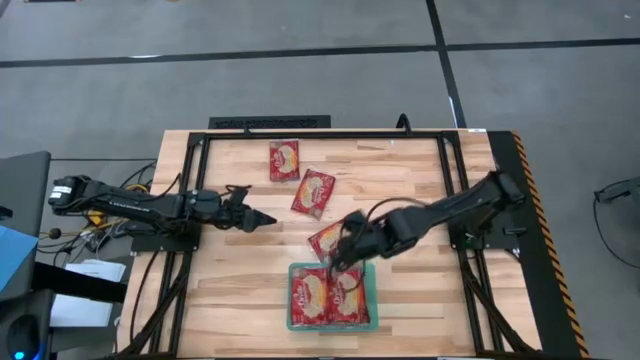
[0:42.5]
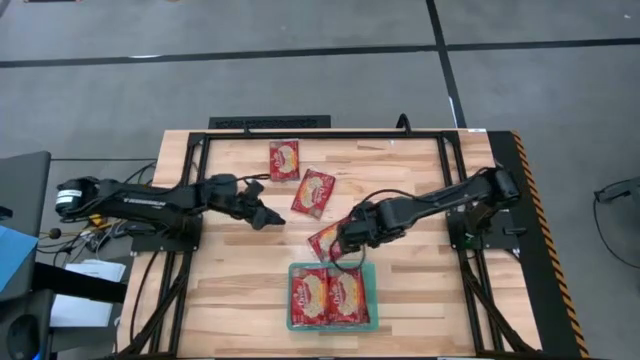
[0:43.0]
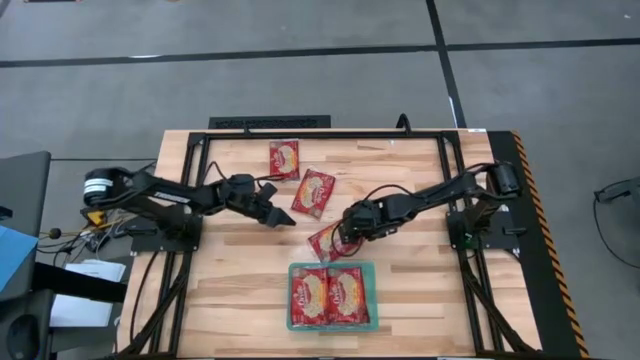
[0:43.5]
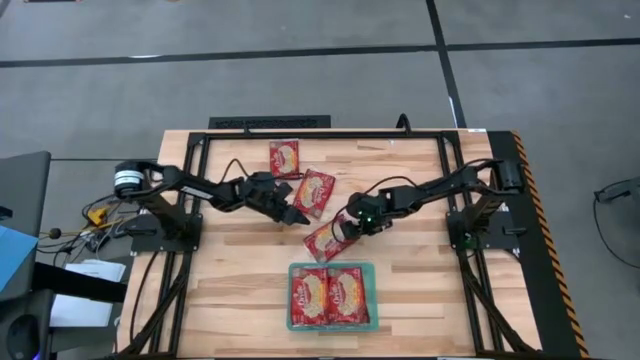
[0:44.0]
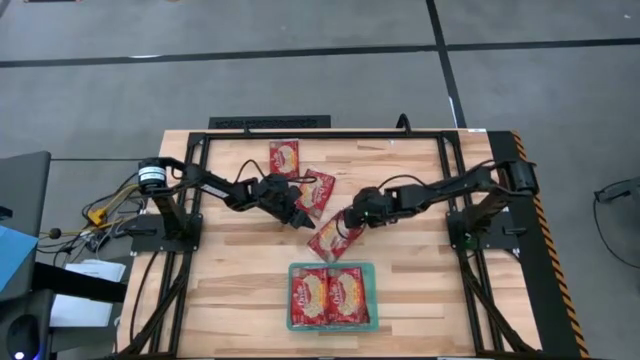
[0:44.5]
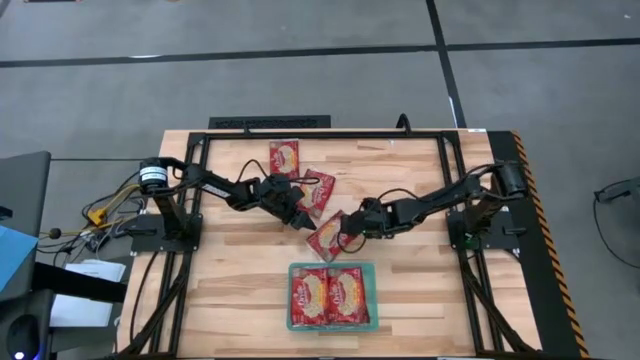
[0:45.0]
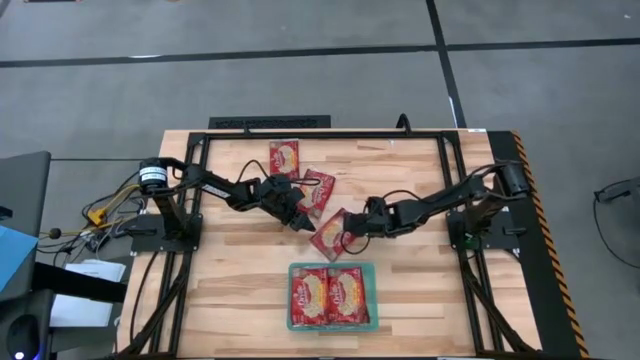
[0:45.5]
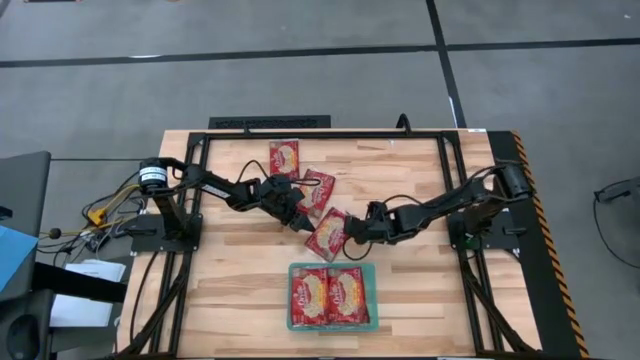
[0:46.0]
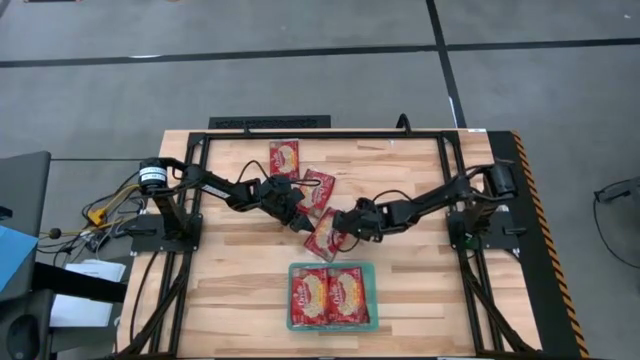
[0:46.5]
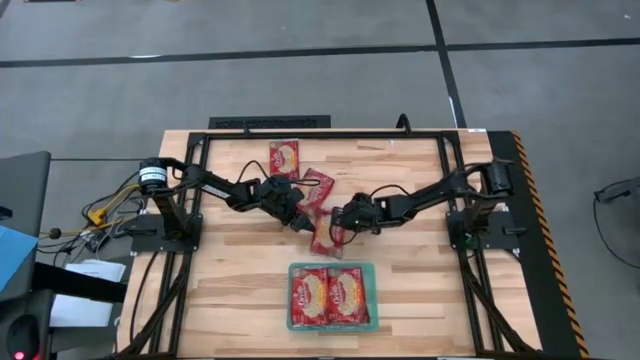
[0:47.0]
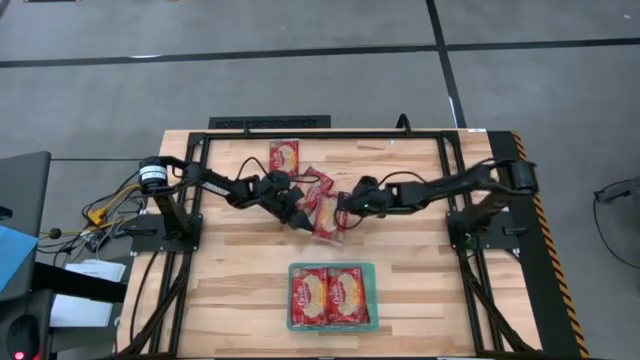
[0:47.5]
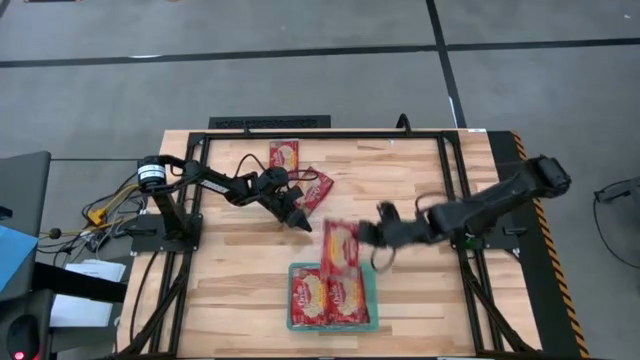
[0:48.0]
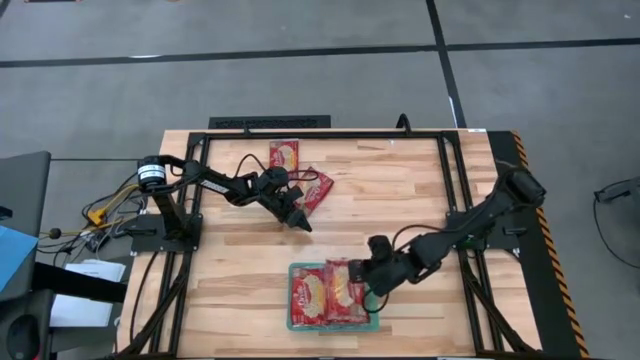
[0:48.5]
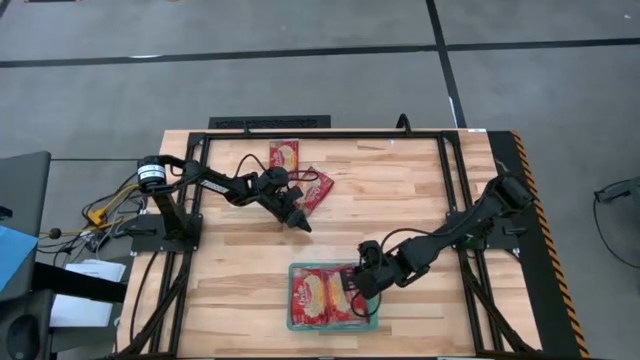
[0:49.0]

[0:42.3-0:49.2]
Task: Sort popcorn bags into baskets
Put the red popcorn bag into the green bin

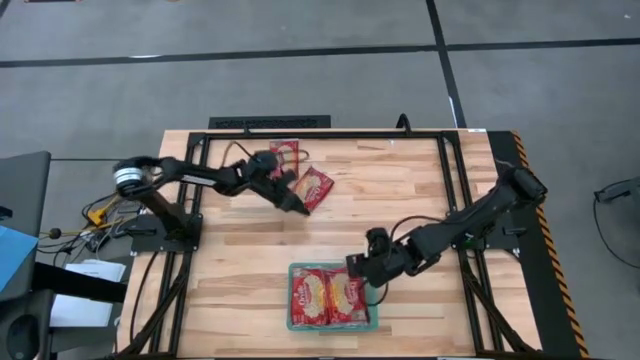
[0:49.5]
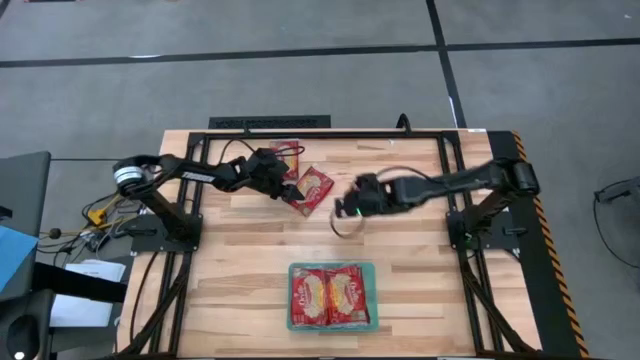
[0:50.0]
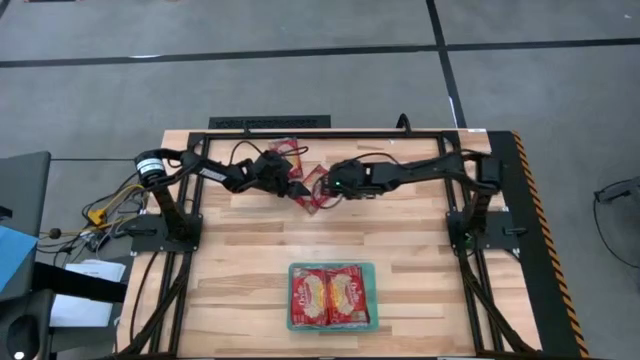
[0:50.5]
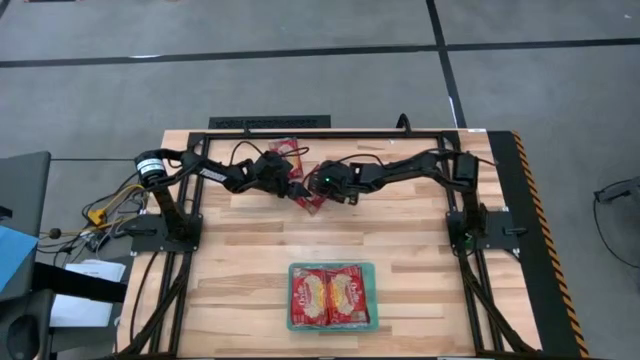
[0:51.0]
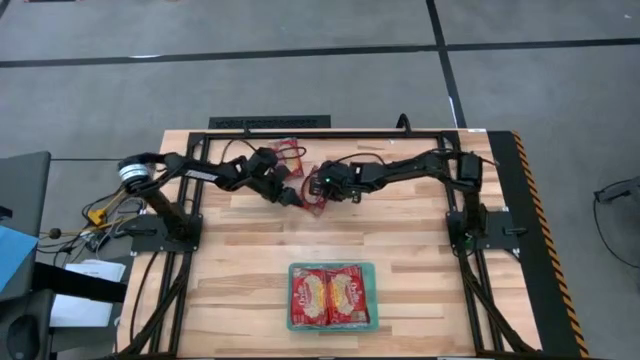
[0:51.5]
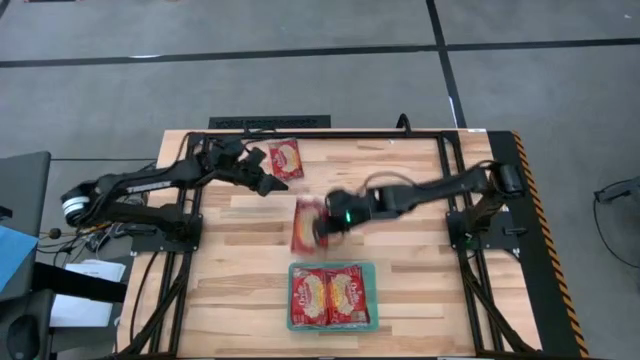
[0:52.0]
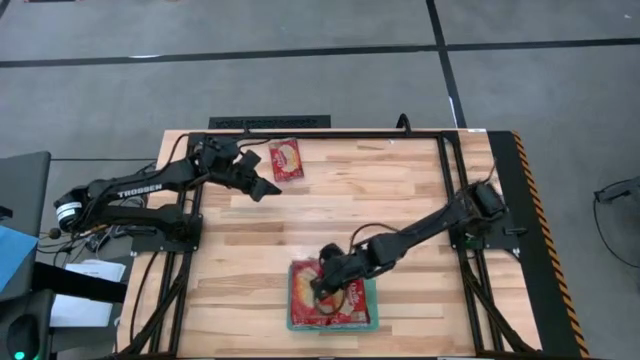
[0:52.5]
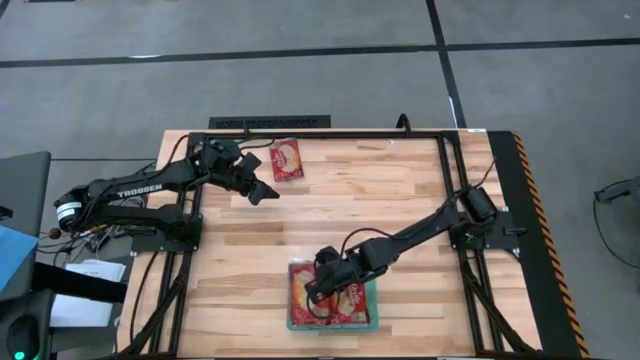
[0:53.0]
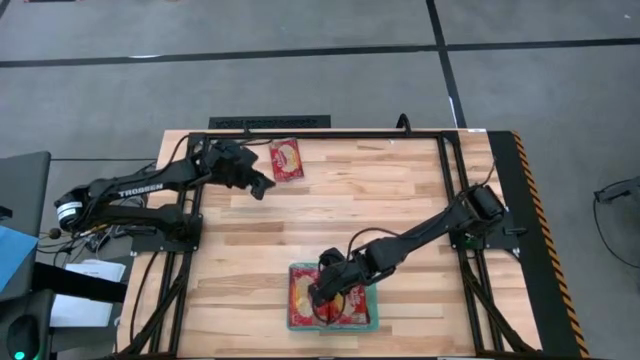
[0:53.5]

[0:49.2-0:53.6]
Put the red popcorn bag into the green bin

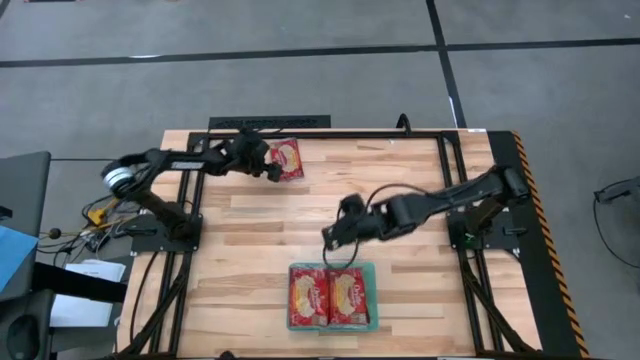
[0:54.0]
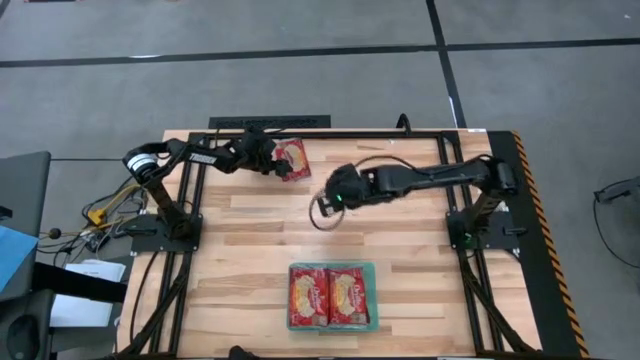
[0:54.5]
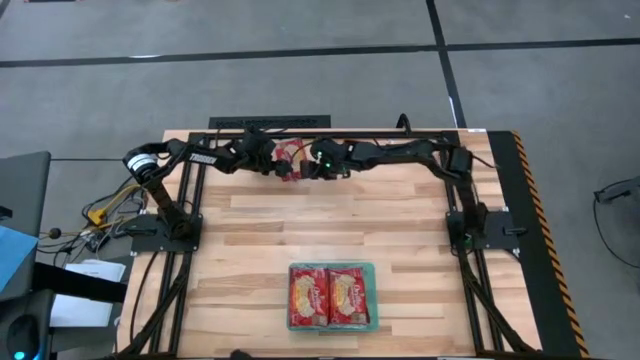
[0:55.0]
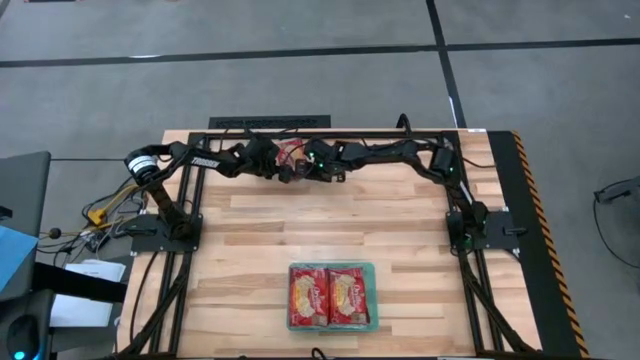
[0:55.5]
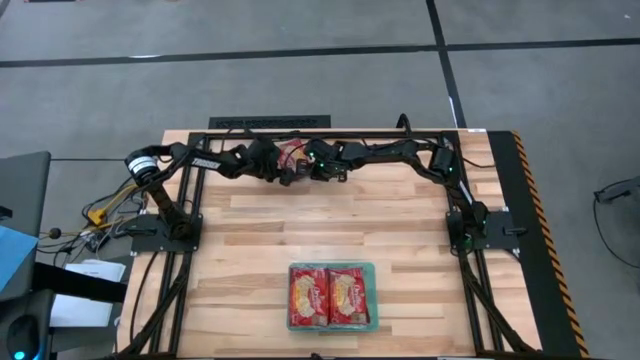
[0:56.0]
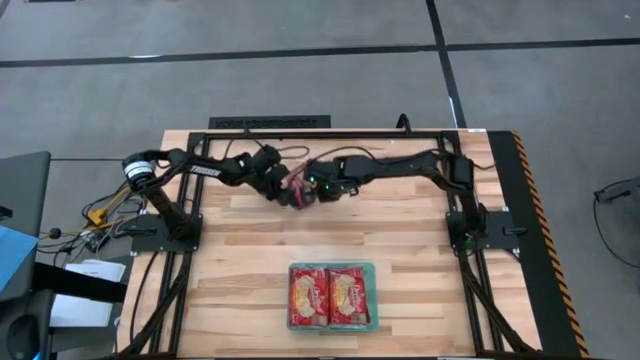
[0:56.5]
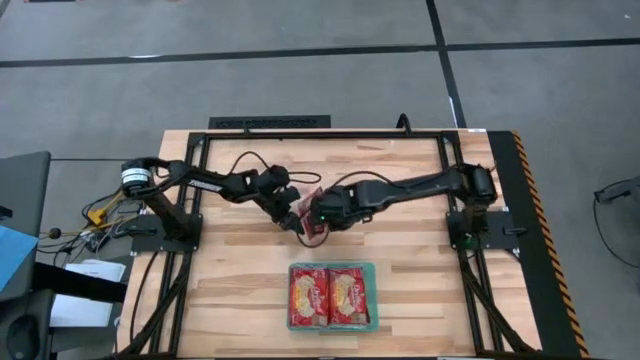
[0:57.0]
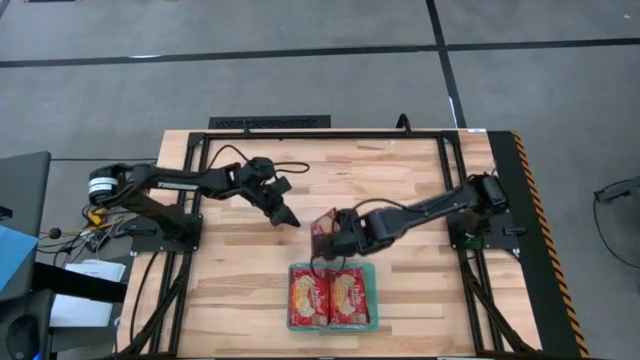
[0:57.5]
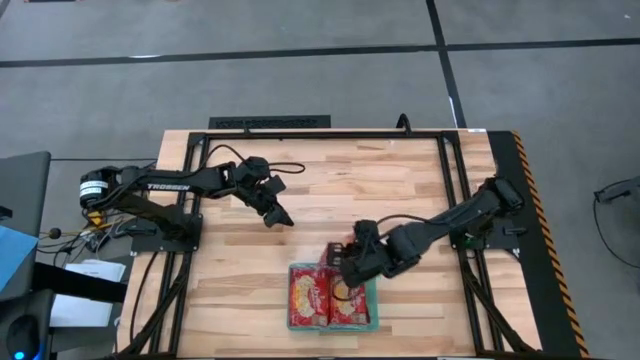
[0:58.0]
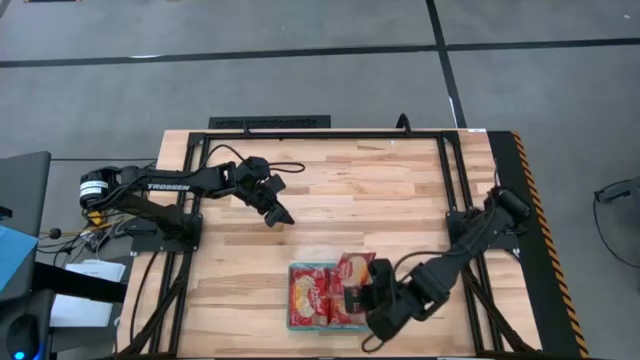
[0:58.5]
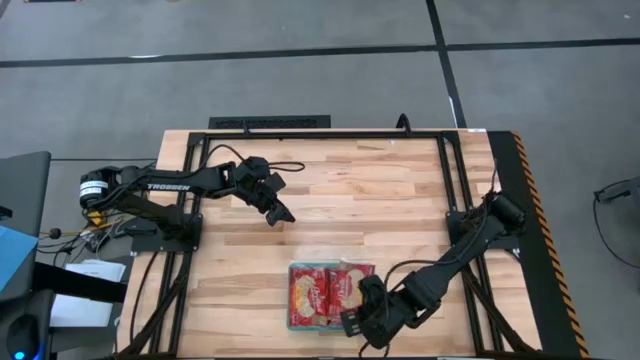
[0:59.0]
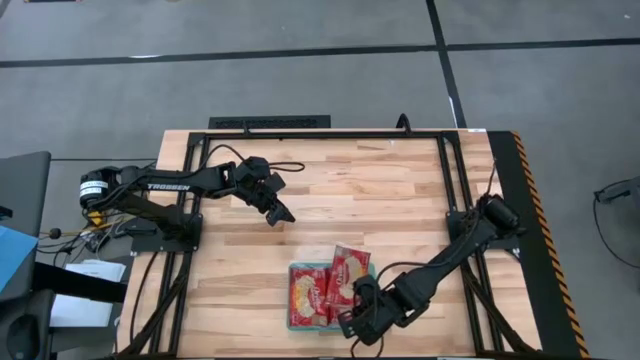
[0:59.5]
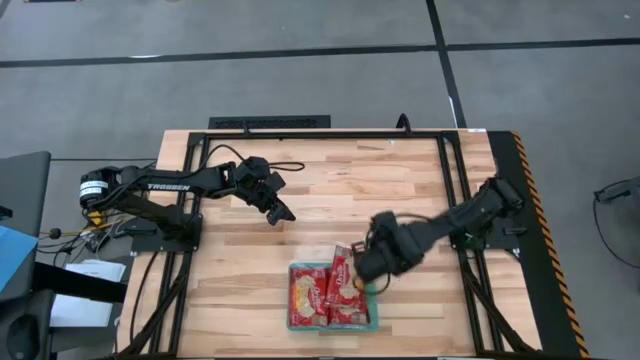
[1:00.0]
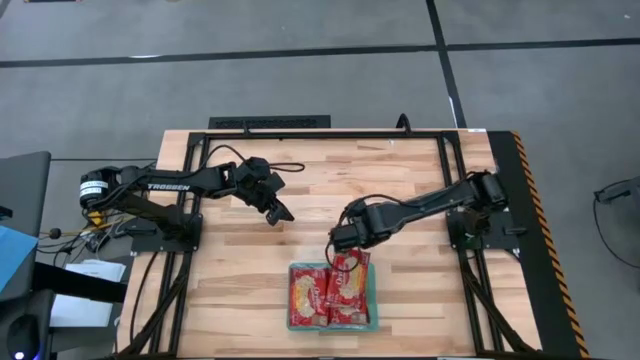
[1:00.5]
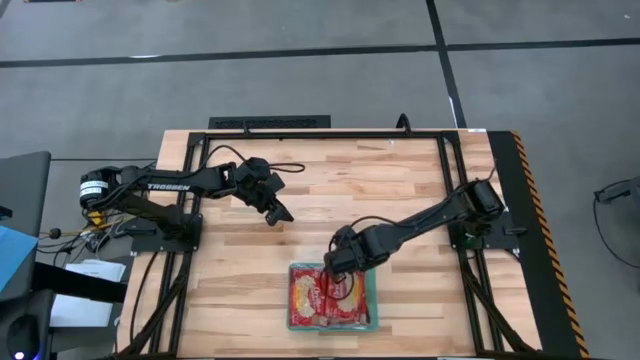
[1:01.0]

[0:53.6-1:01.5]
Put the red popcorn bag into the green bin

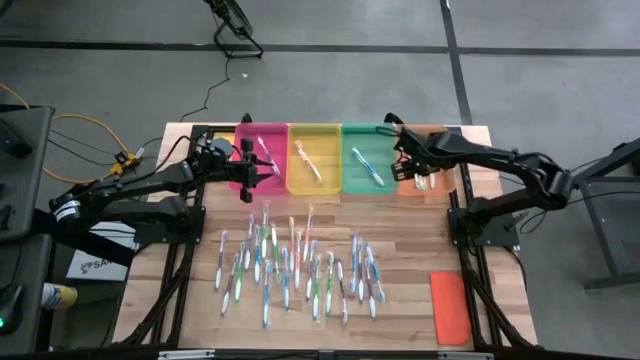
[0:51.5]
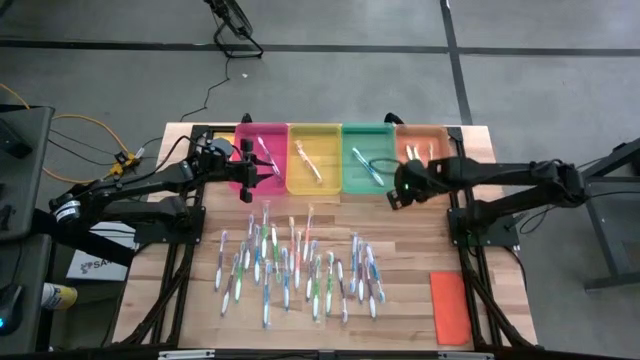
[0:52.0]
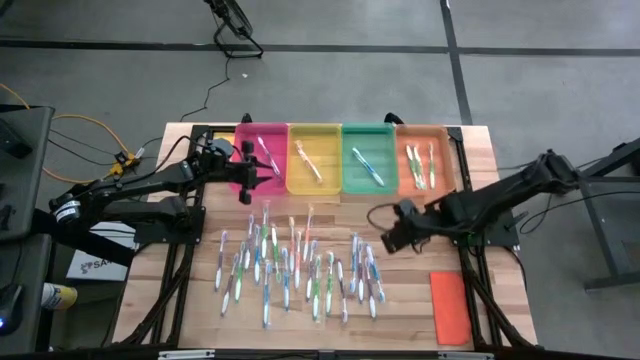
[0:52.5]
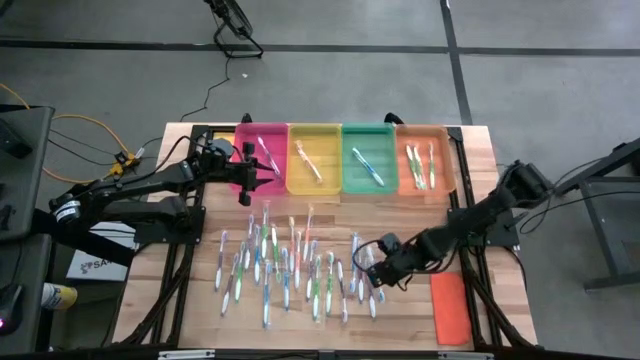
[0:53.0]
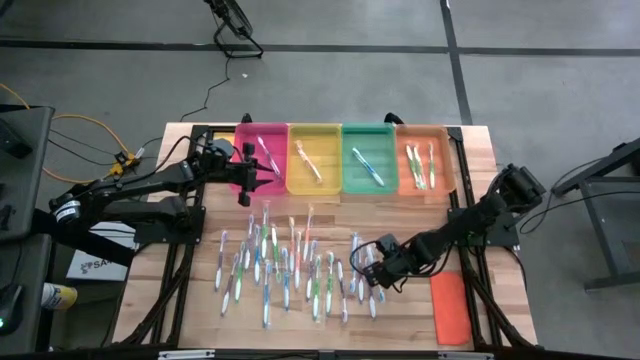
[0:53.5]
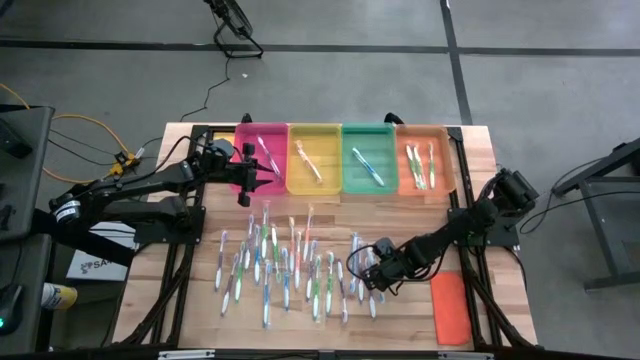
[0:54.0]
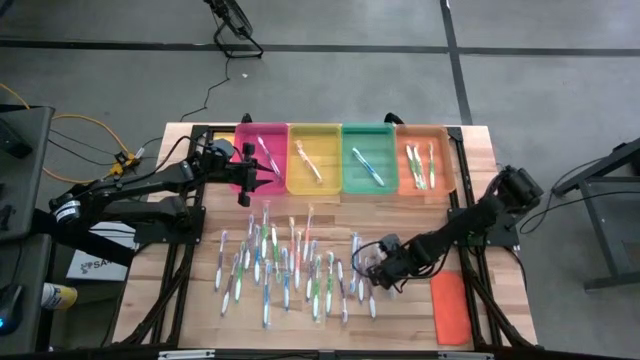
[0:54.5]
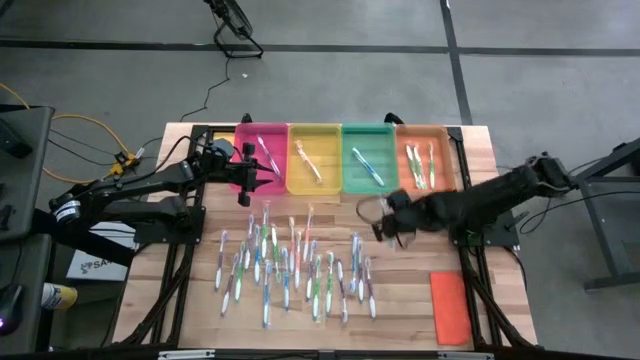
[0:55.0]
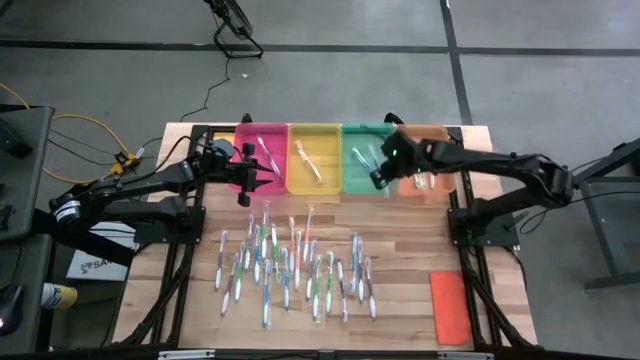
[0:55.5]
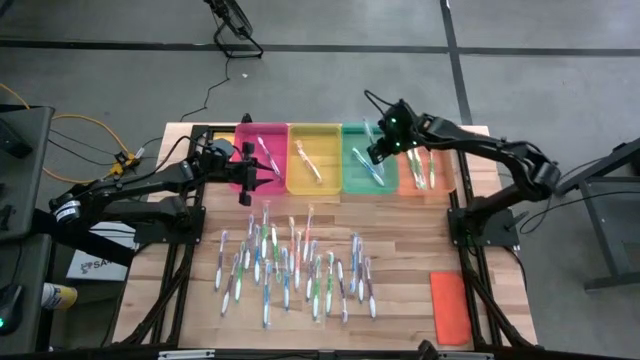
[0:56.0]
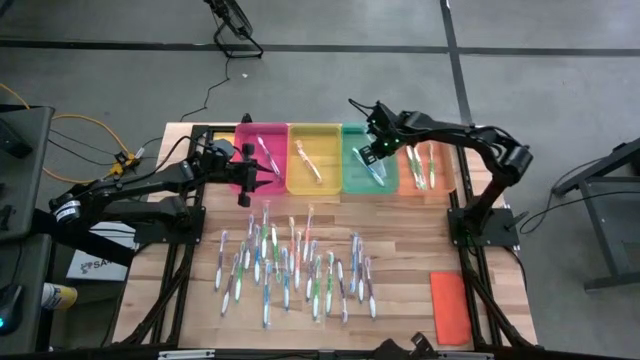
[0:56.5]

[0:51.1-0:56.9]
Task: Pick & Place Toothbrushes
Put the blue toothbrush into the green bin
